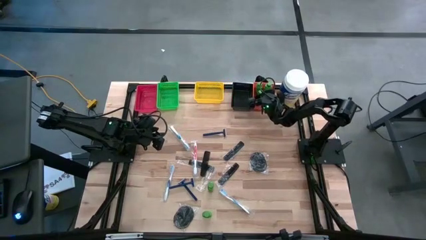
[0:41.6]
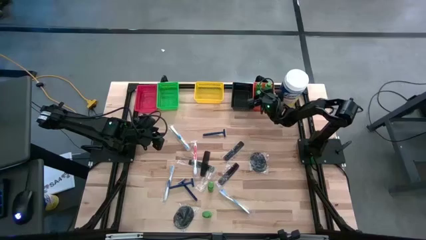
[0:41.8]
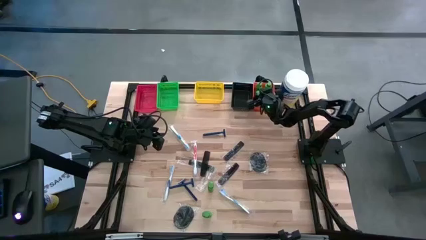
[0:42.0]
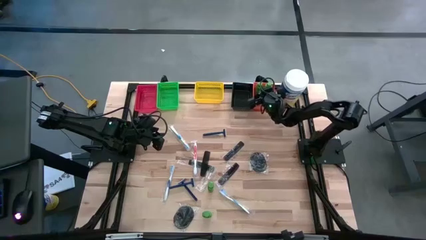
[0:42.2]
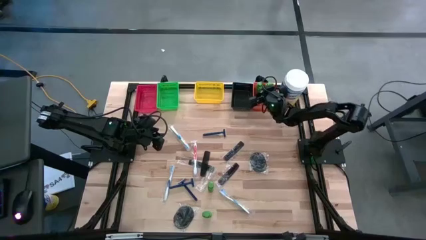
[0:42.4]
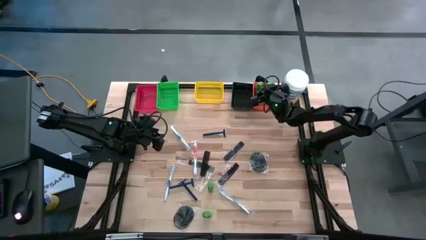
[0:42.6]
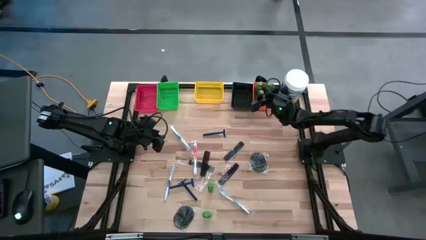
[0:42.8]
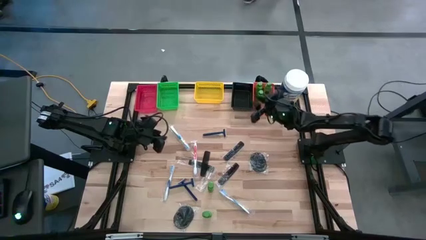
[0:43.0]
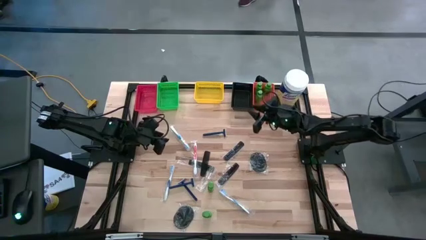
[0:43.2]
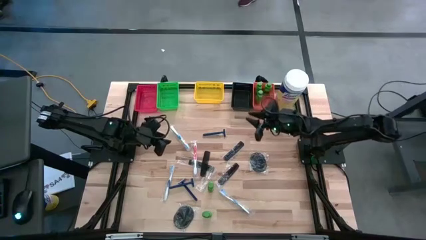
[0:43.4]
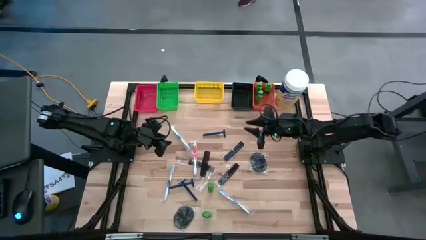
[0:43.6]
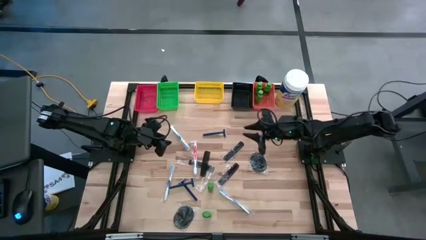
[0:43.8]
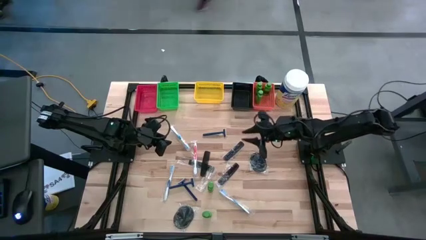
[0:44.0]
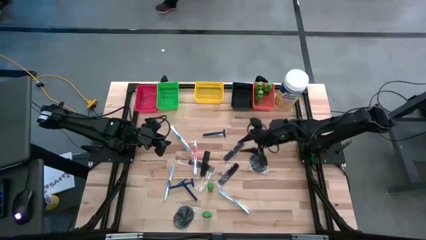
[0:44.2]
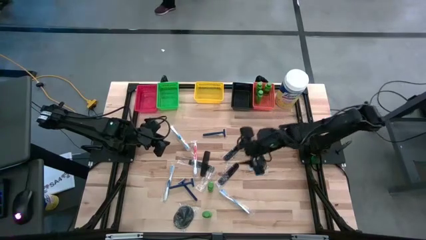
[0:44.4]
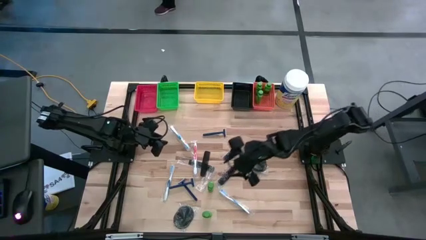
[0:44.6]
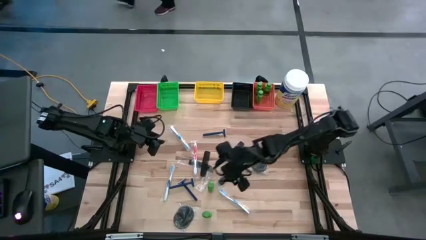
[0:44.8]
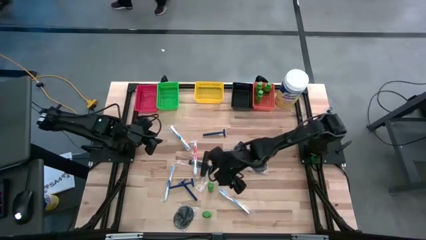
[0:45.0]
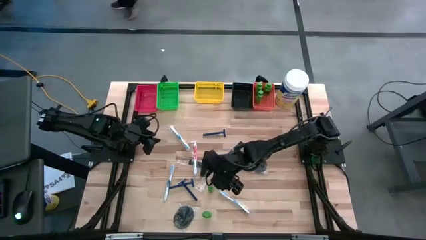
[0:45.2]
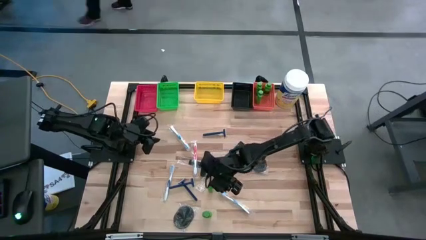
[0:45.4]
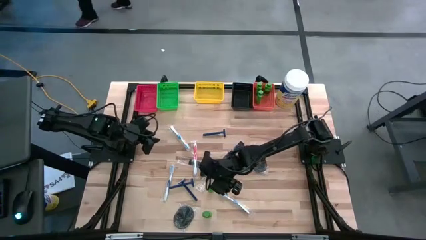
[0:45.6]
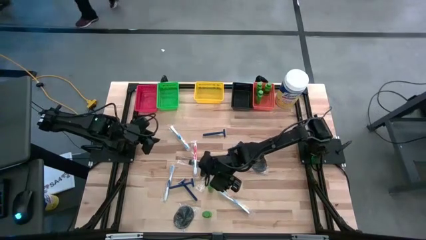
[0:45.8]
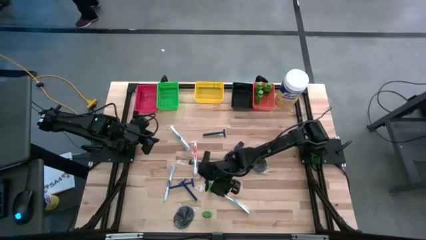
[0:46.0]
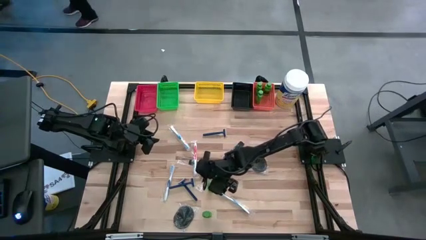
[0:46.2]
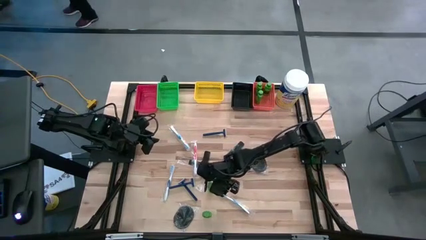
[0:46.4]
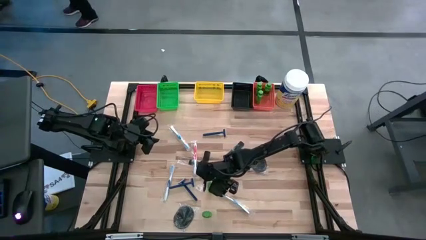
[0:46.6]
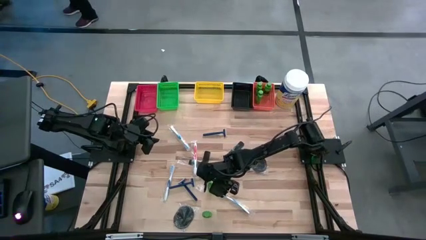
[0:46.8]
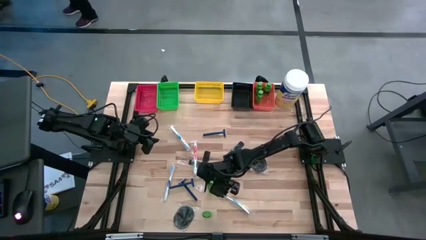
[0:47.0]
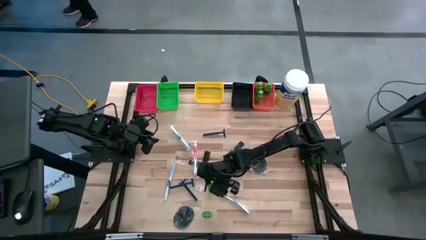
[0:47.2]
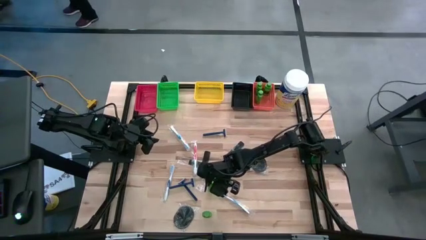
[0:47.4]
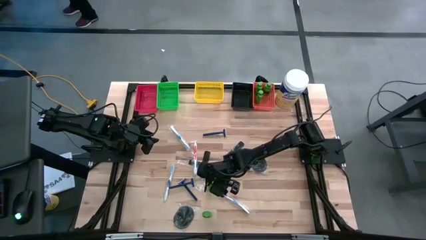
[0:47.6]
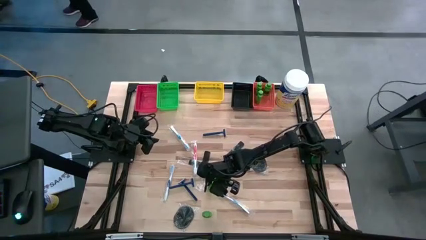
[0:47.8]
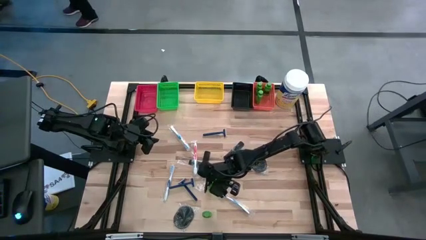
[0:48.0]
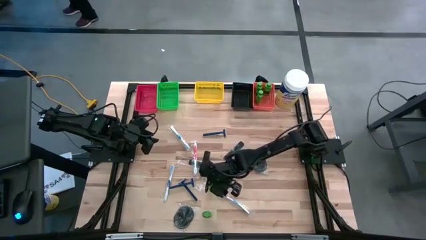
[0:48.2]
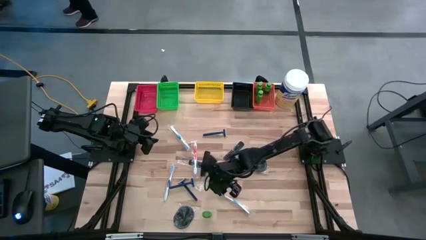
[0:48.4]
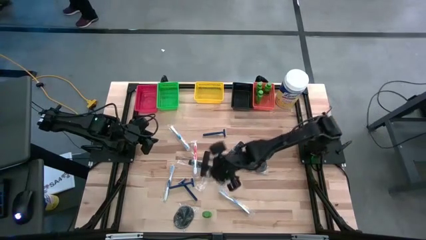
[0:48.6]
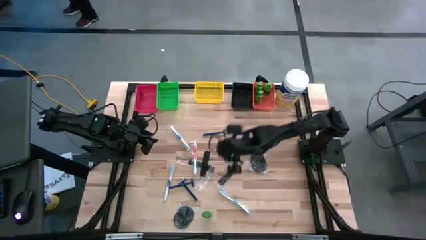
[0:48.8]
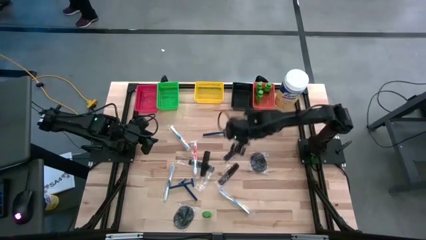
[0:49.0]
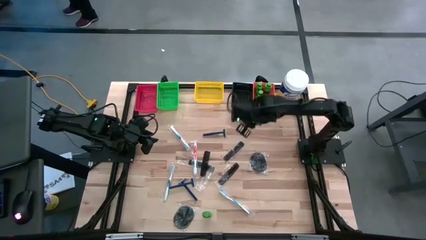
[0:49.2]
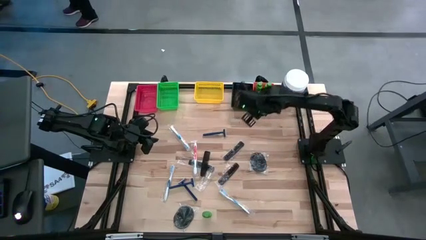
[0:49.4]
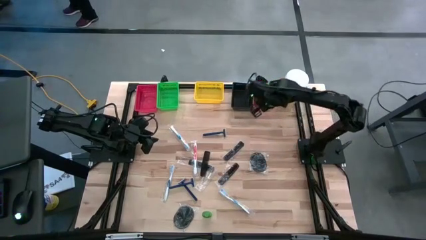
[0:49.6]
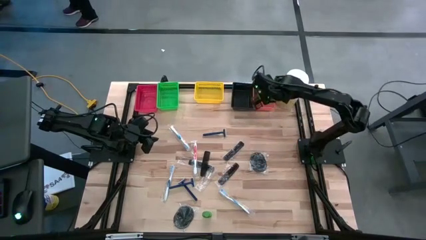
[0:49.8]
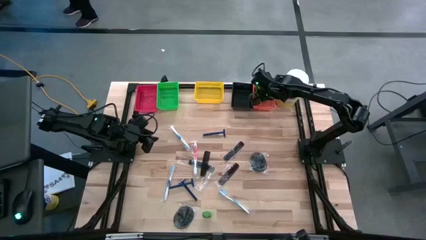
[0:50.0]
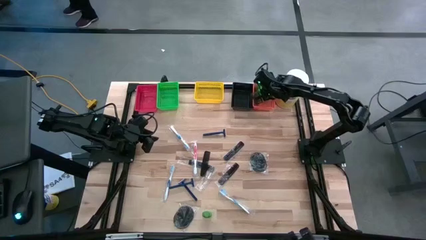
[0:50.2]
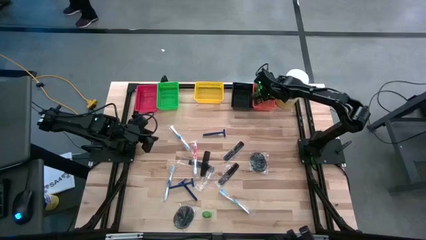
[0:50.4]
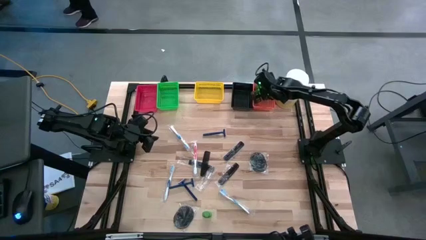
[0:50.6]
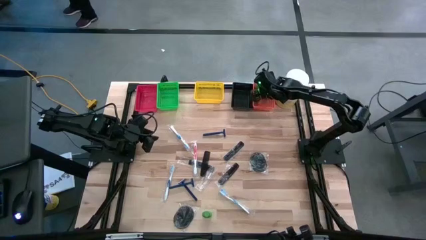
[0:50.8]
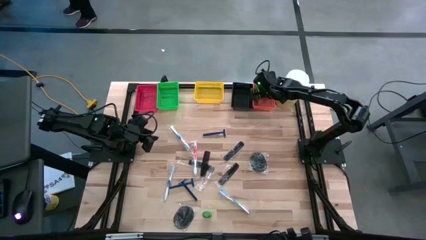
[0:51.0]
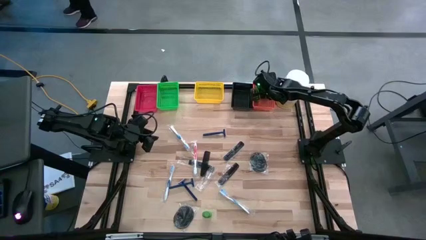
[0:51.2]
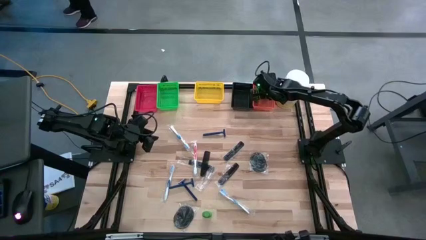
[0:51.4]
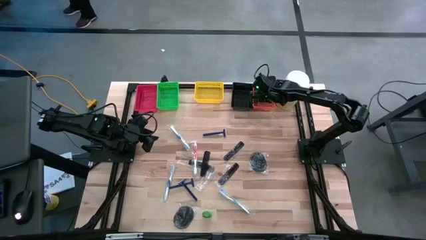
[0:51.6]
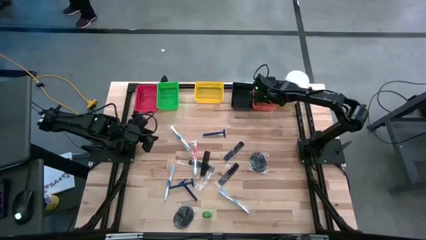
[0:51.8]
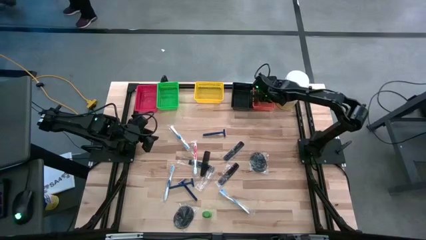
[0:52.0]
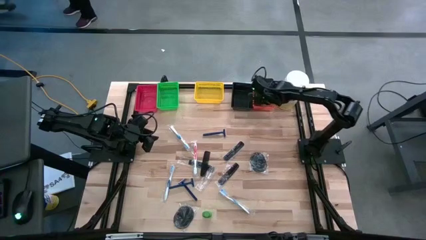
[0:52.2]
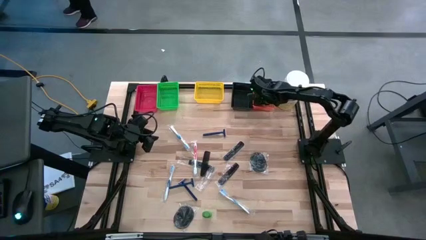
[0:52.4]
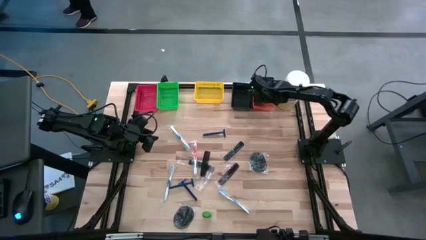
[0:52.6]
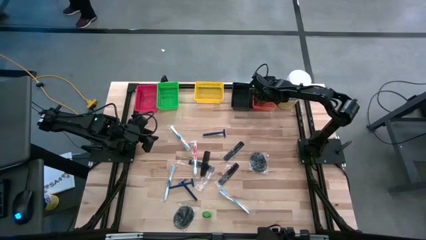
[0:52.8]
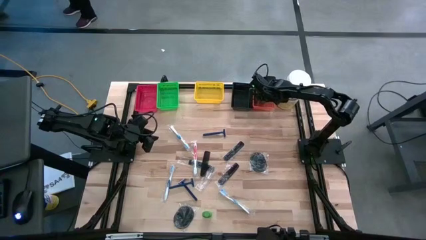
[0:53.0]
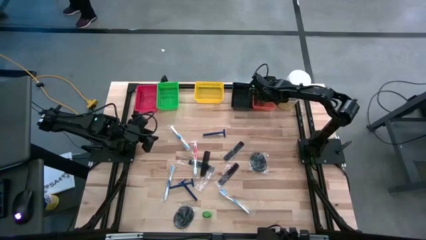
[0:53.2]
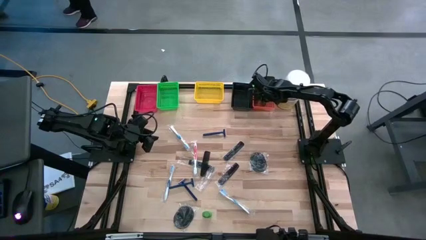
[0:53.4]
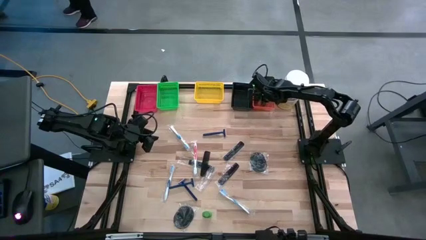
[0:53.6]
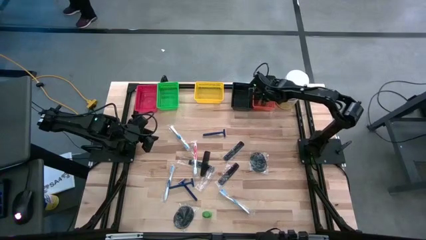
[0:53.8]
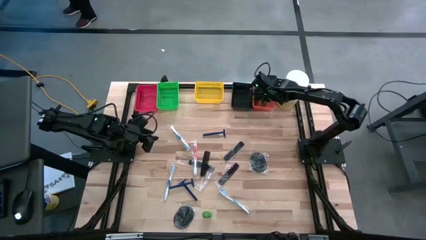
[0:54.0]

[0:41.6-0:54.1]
Task: Pick & Place Travel size toiletries
Put the green shampoo bottle into the orange bin

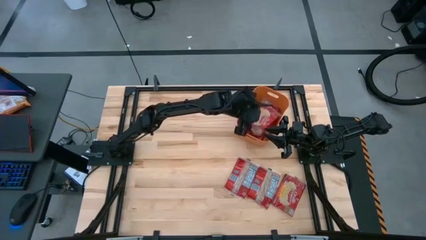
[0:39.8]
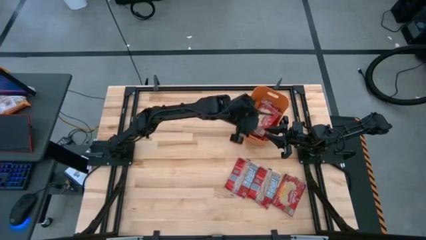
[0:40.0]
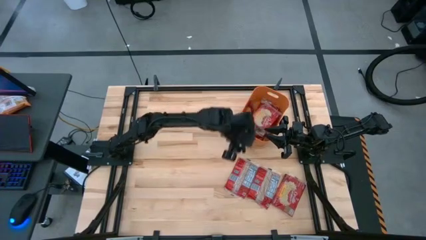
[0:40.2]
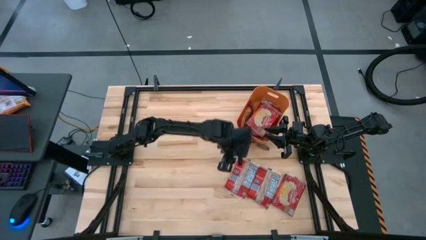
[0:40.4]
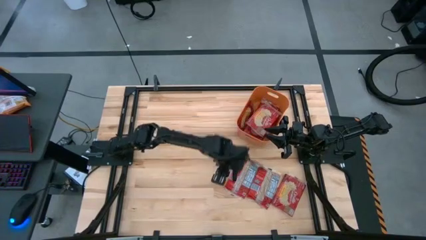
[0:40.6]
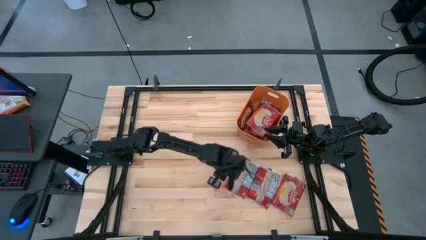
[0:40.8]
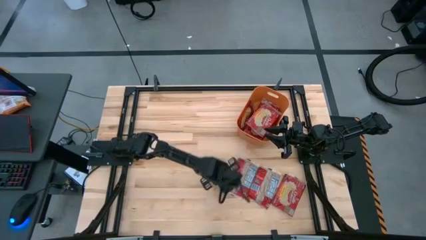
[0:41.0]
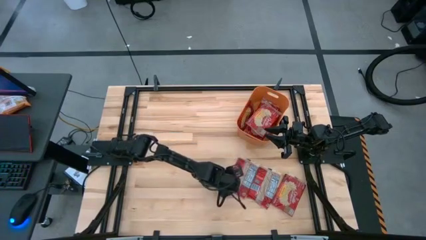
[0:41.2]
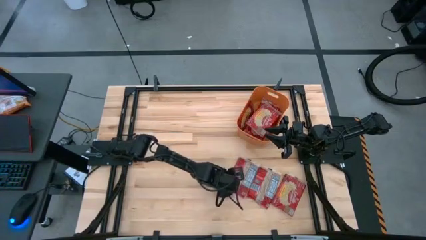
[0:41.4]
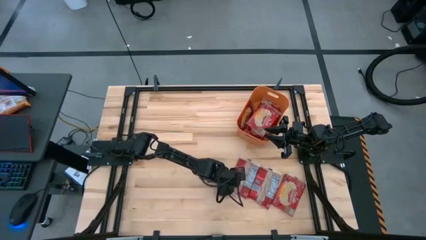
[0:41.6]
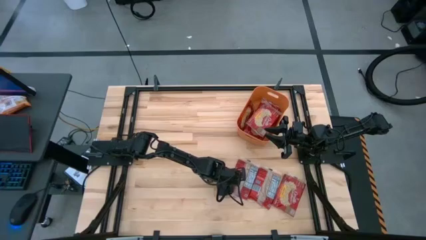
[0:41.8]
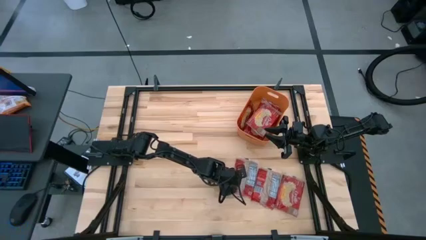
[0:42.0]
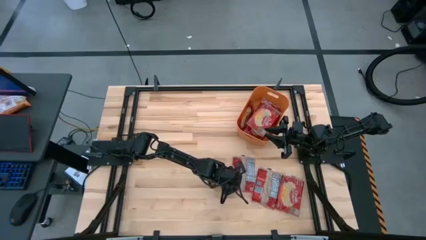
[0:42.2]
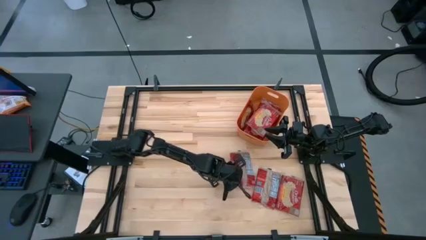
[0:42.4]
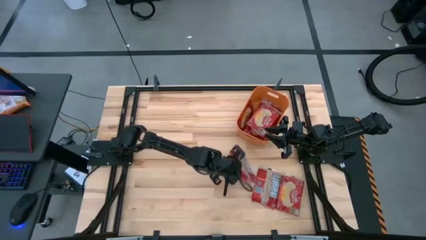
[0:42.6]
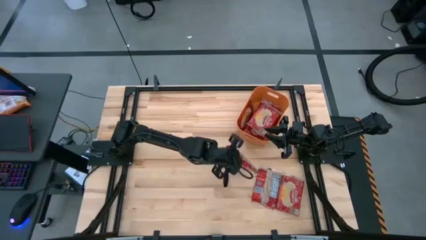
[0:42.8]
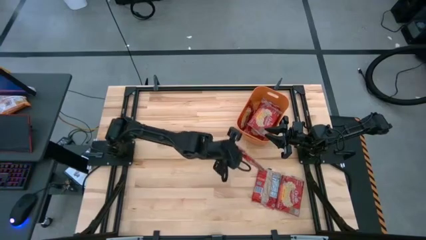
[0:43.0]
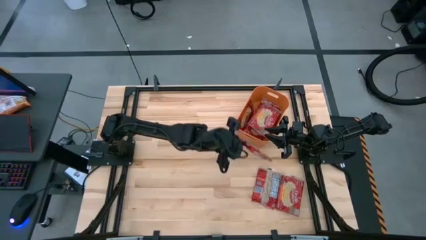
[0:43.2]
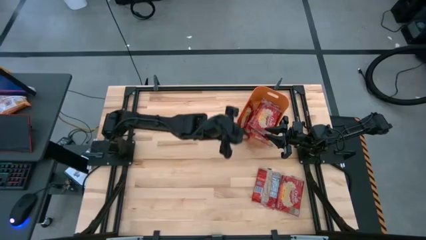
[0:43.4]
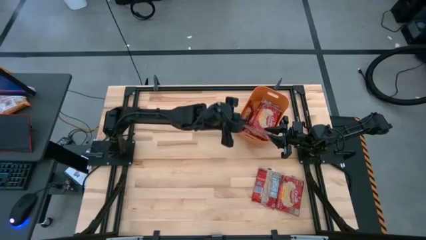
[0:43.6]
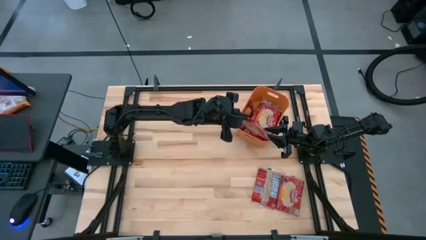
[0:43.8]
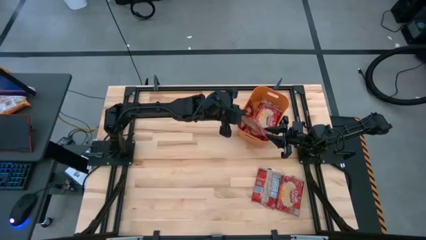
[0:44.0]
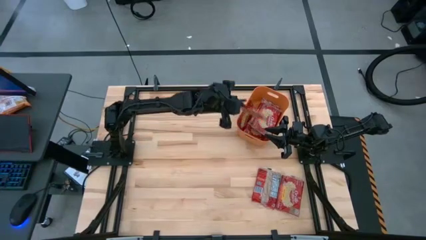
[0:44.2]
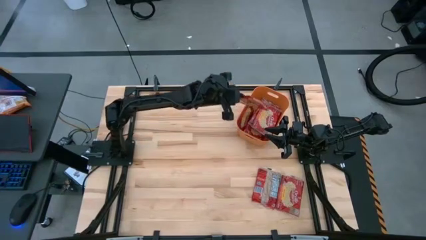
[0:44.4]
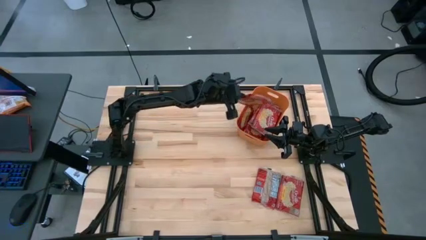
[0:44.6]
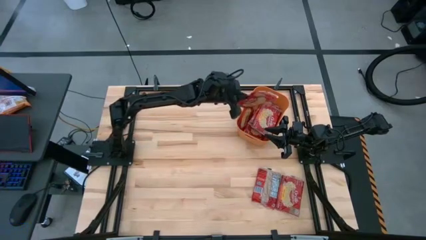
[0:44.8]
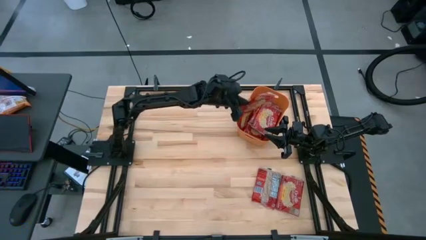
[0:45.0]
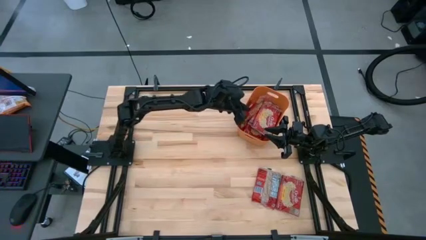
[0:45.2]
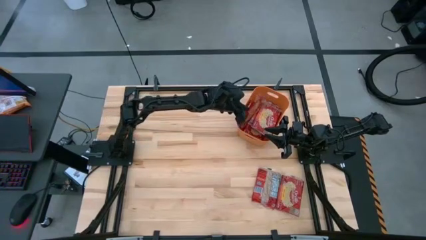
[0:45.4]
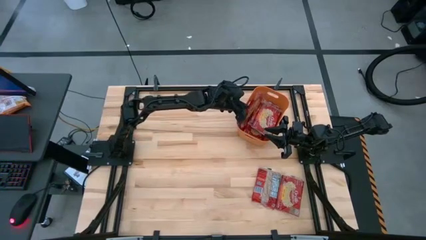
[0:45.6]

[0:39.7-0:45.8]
Task: Sort popcorn bags into baskets
Put the red popcorn bag into the orange bin
